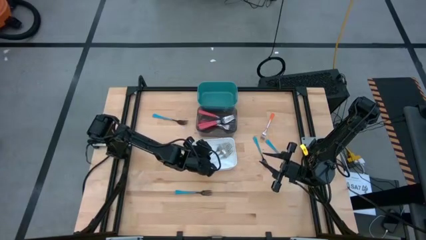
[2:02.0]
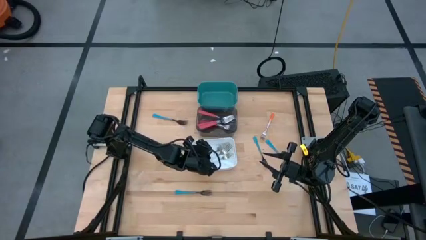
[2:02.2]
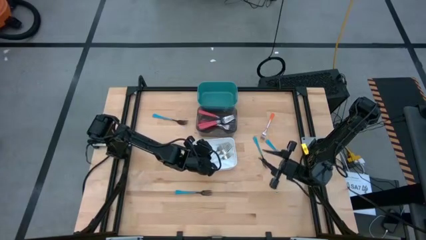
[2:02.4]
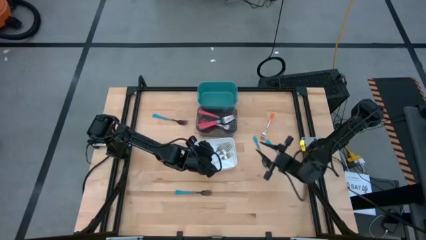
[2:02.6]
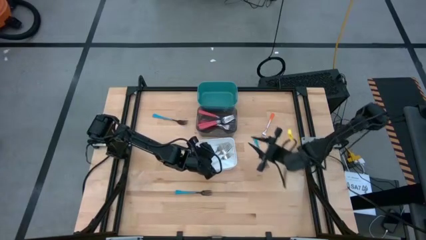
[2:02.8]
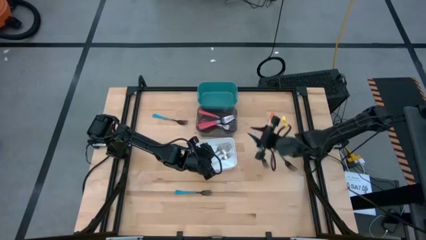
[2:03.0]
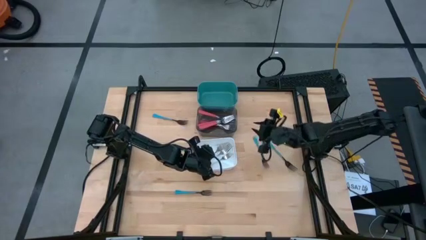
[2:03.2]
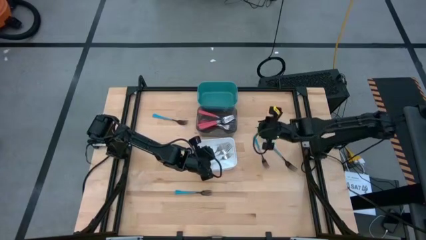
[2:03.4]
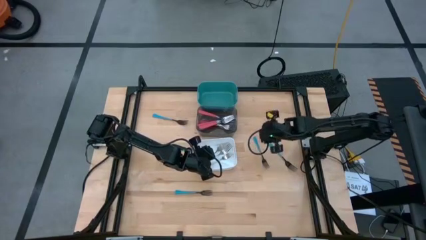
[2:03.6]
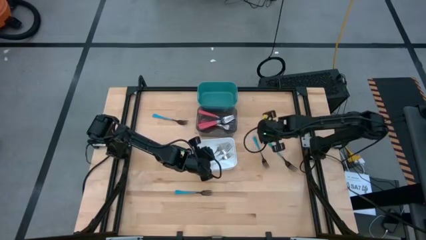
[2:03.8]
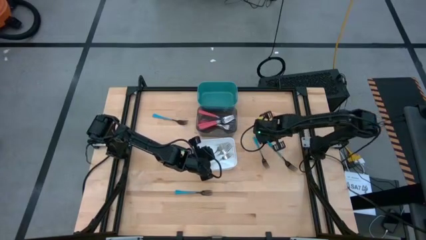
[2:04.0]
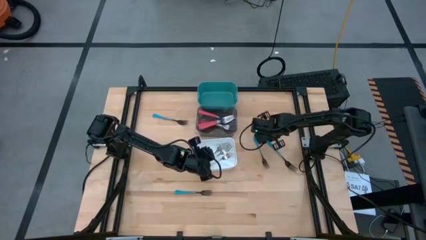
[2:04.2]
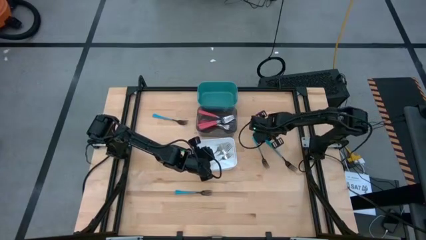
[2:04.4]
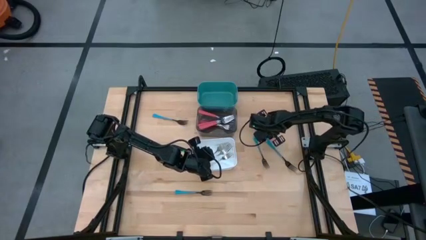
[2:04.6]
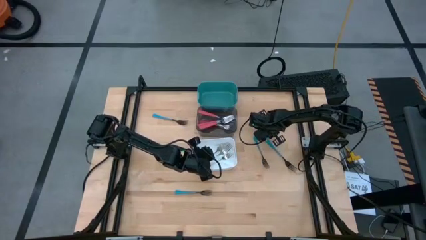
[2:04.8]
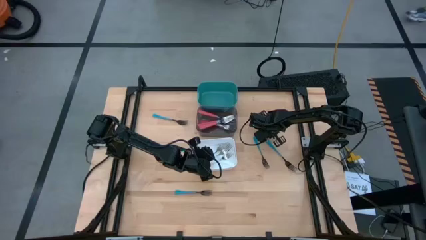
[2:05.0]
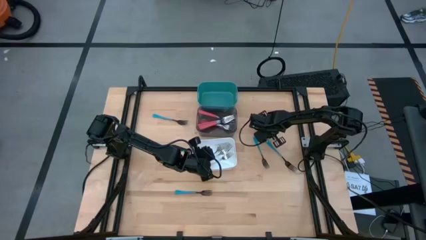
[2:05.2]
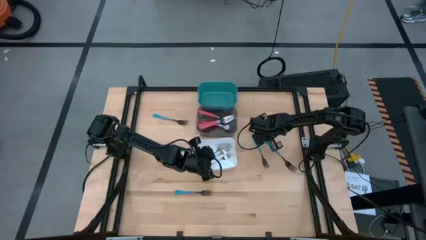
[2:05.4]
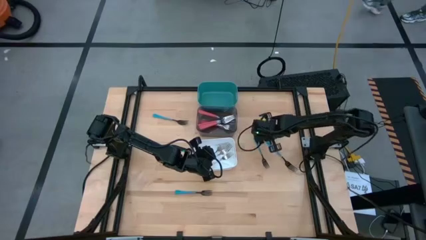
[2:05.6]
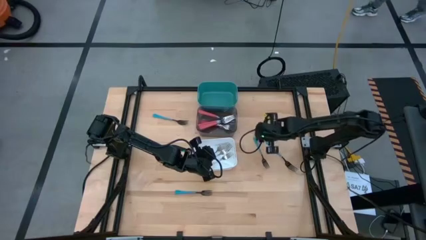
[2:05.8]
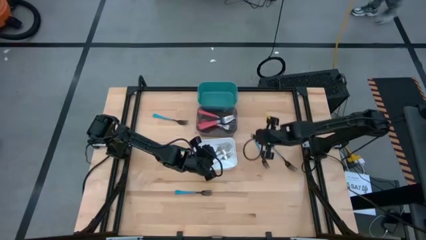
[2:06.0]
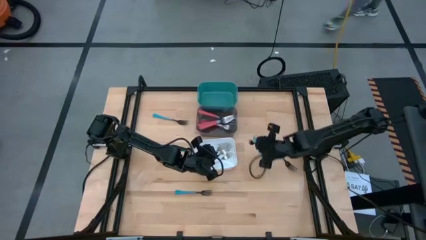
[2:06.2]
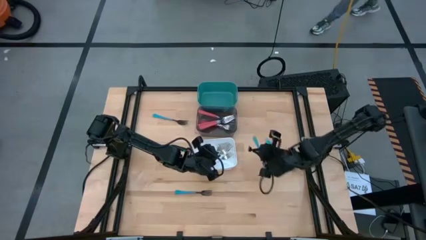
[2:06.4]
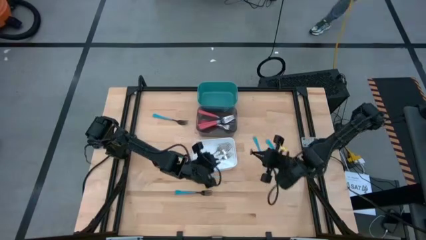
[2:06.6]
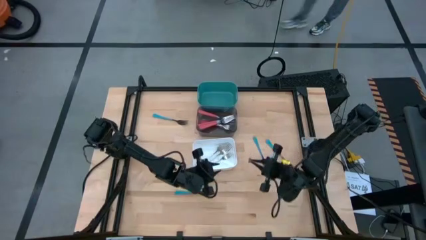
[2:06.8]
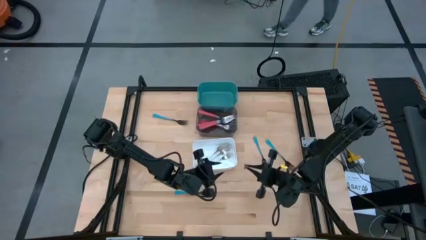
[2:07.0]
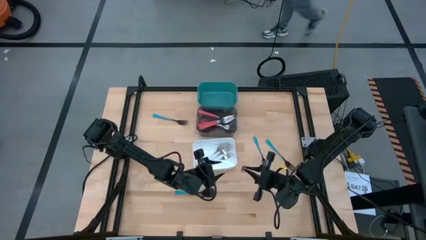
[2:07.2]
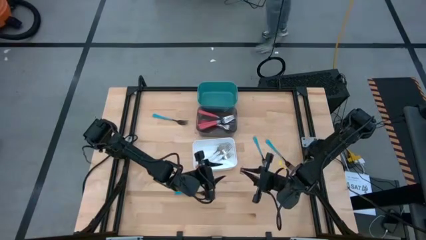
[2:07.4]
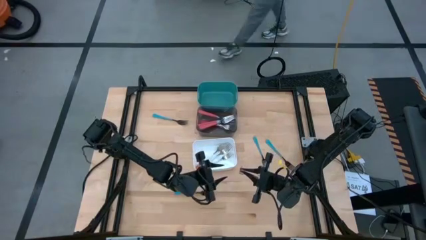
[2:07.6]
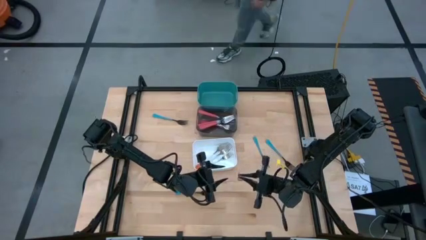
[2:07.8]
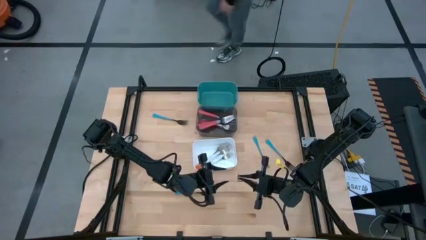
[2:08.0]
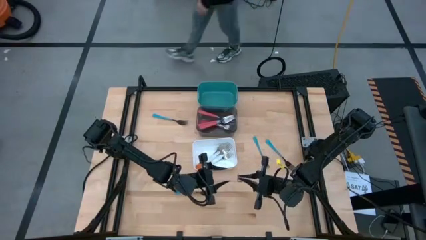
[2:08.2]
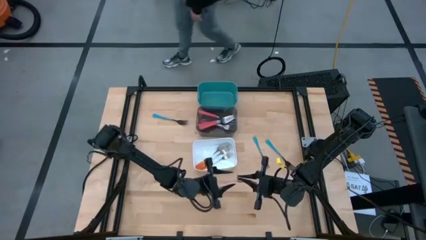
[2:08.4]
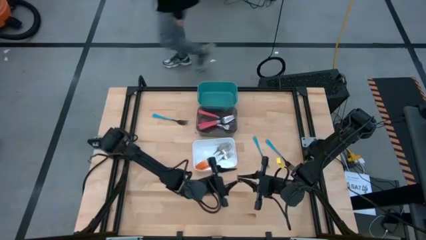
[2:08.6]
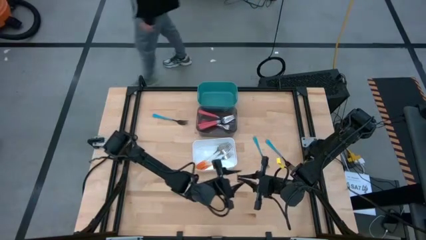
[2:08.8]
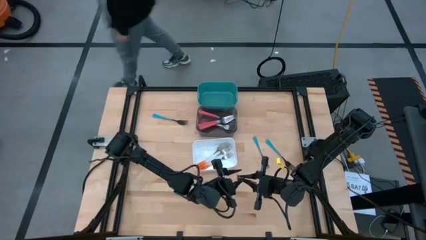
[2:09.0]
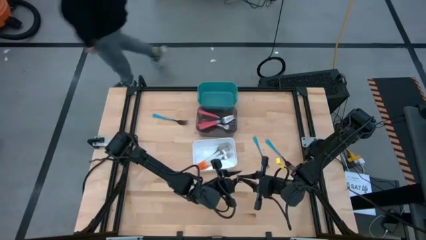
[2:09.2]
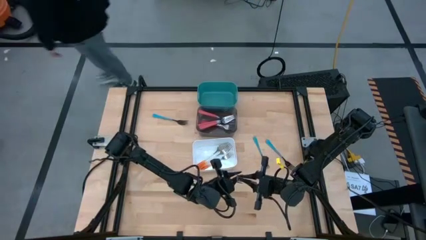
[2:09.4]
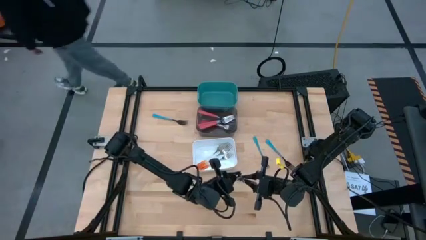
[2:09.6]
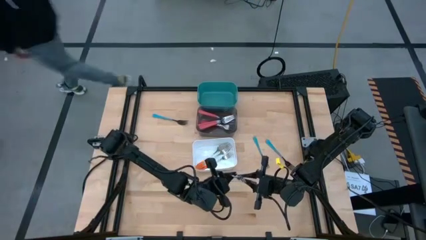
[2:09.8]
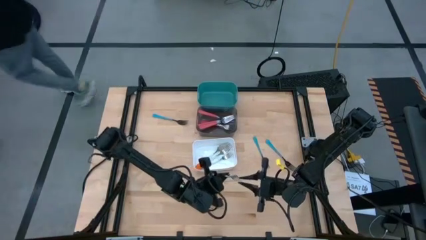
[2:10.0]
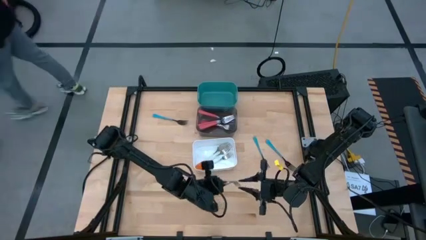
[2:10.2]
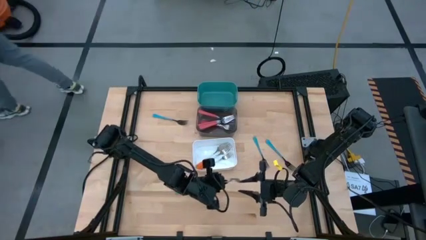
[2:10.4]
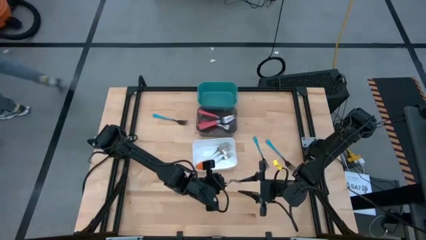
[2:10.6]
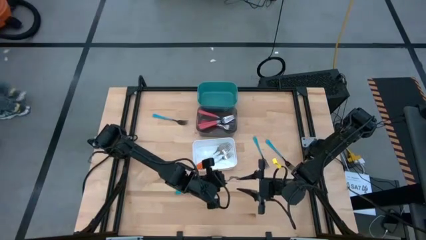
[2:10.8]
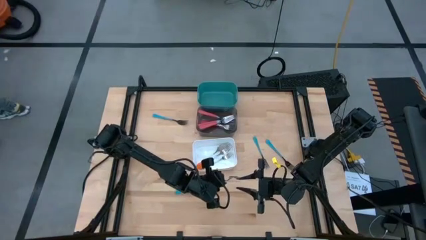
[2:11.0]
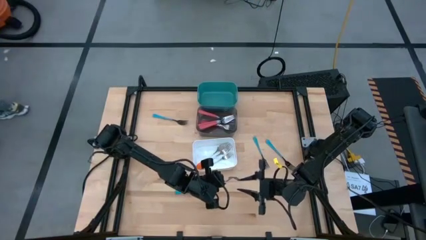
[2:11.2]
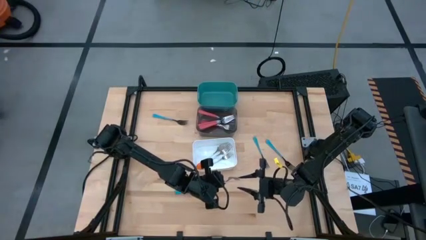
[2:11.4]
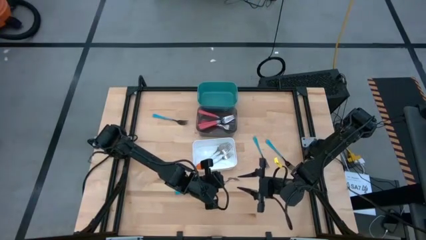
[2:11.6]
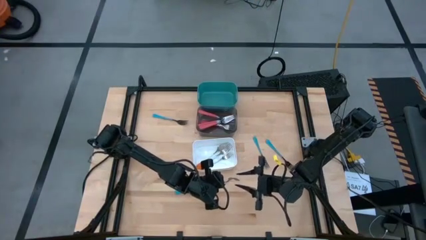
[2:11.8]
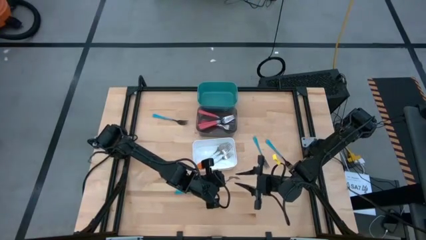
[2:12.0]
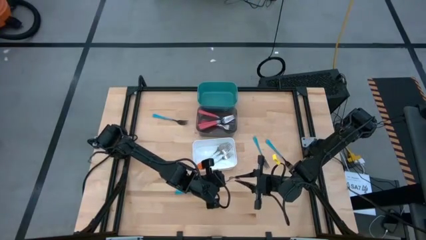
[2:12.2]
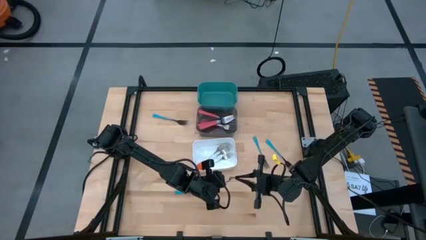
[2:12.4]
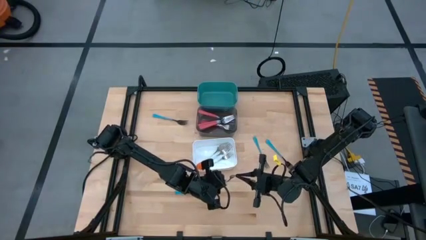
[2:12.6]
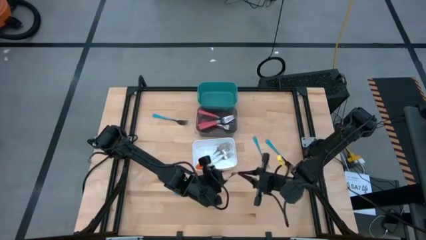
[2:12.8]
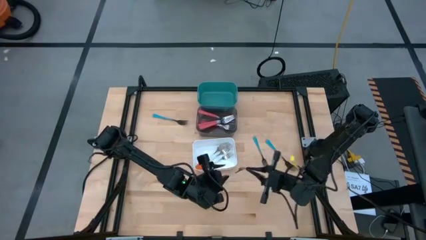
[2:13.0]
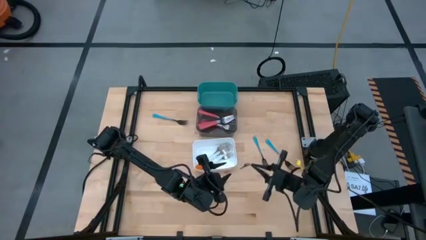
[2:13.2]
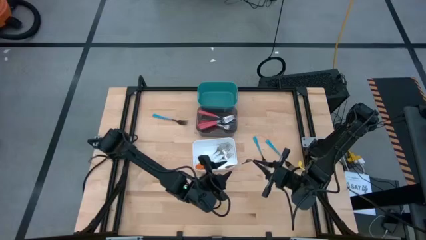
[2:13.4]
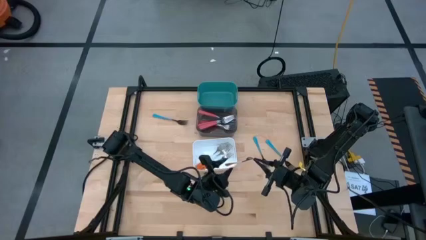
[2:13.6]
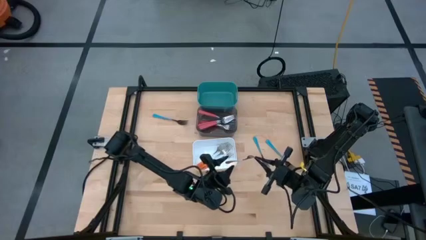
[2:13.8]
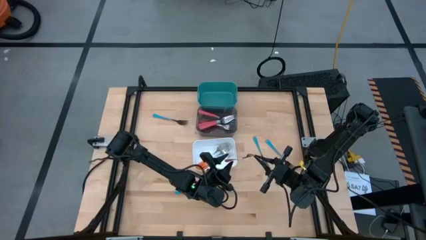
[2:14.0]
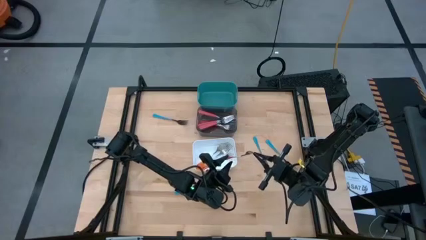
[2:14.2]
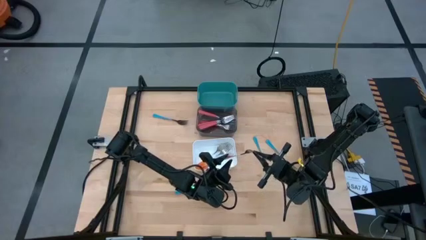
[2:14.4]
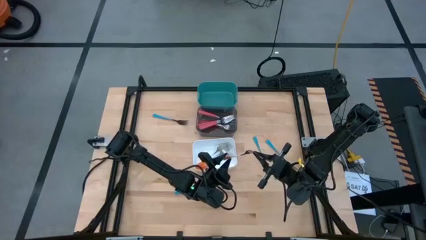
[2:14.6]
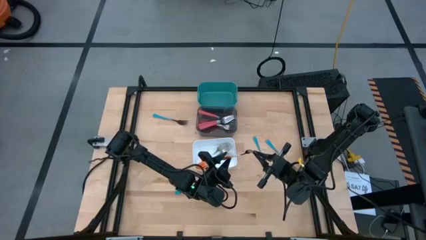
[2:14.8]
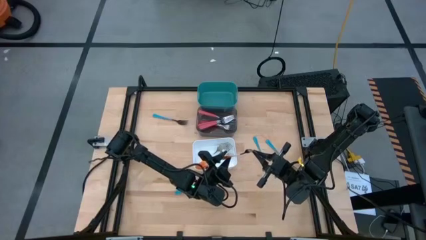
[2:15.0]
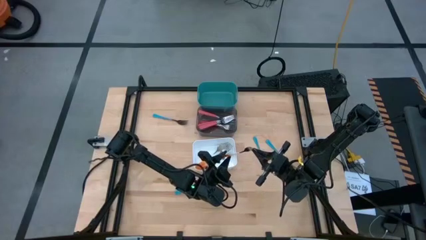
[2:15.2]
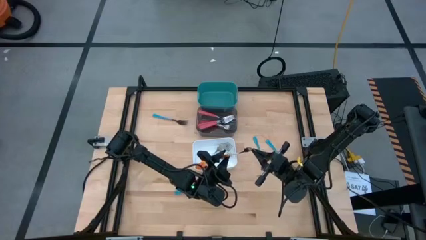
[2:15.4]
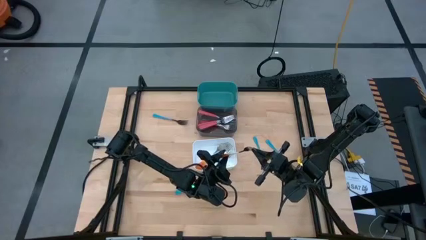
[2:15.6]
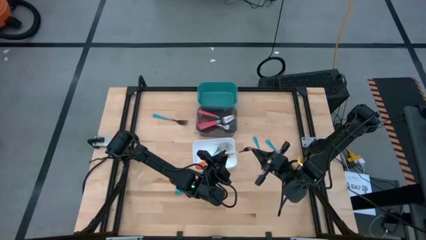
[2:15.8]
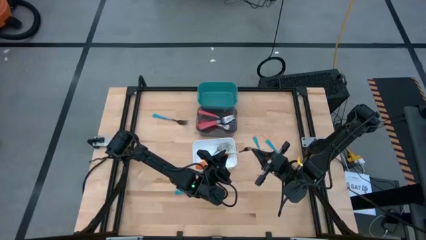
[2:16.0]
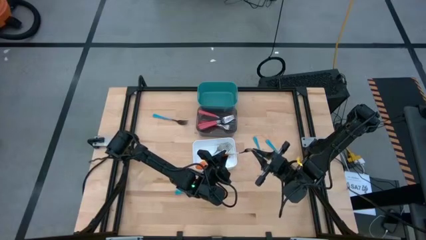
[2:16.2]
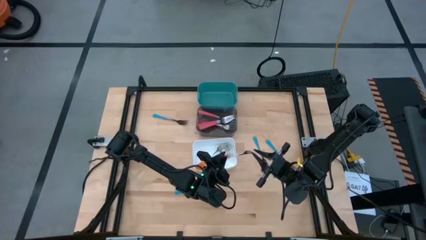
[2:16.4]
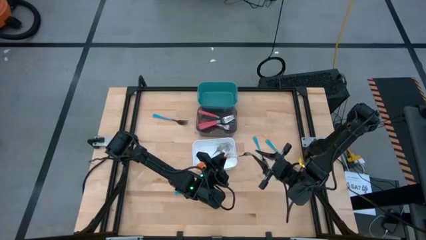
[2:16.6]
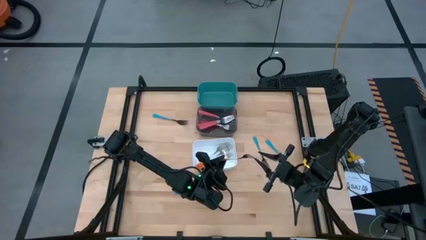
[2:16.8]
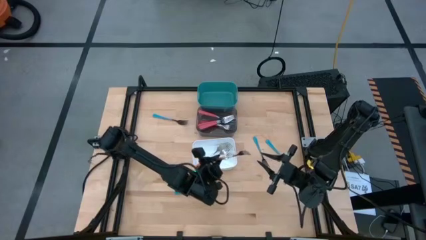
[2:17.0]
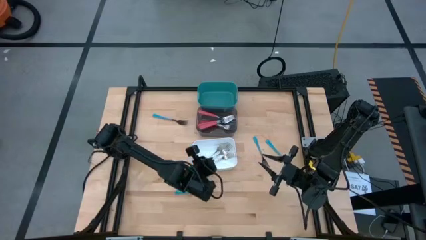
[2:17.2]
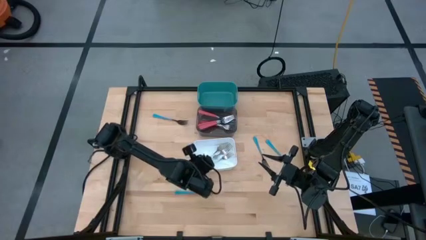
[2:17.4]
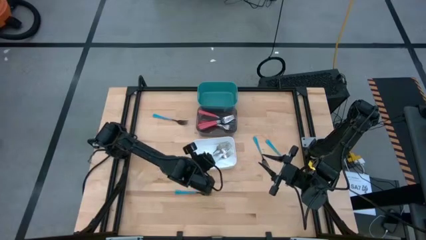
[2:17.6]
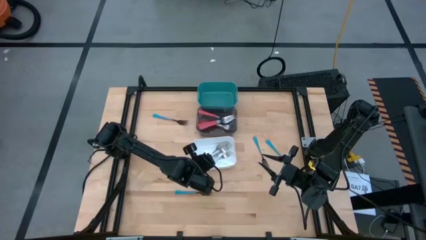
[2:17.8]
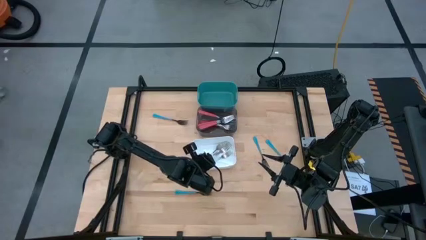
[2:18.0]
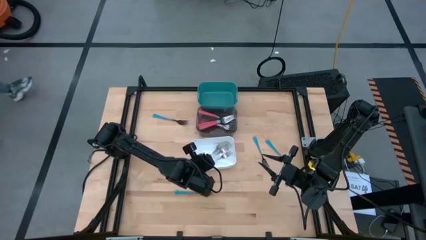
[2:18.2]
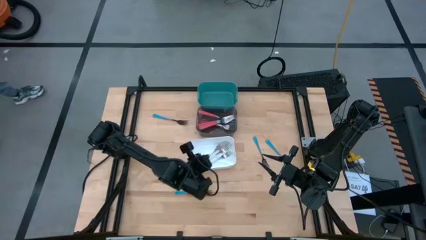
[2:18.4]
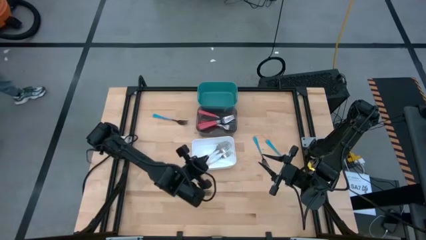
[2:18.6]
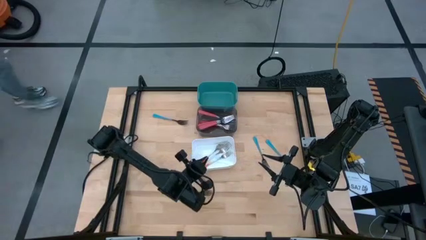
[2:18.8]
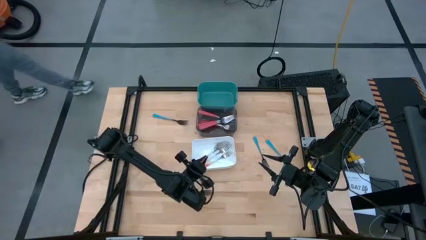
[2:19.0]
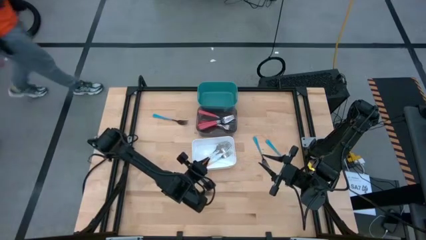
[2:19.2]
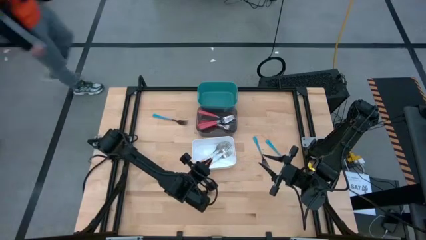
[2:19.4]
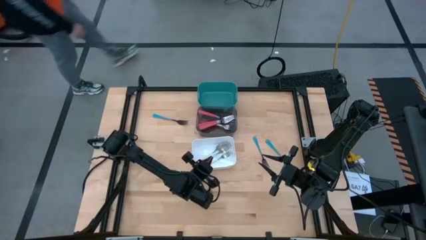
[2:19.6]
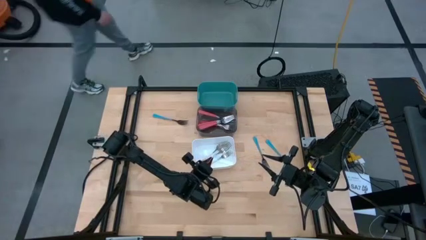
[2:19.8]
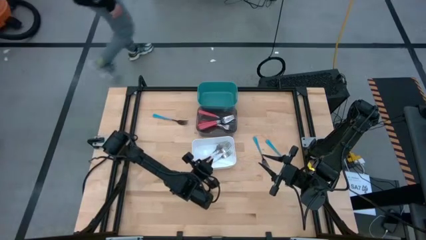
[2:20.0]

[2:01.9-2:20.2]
Task: Sort silverware by color (type)
Put the orange fork into the white bin
